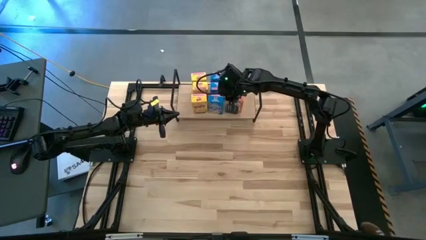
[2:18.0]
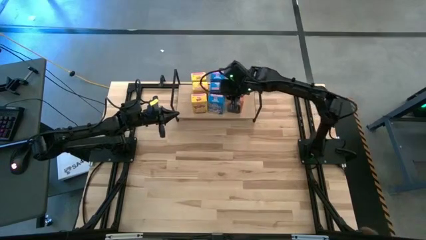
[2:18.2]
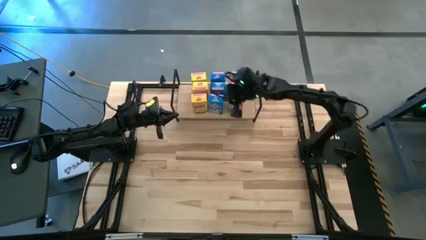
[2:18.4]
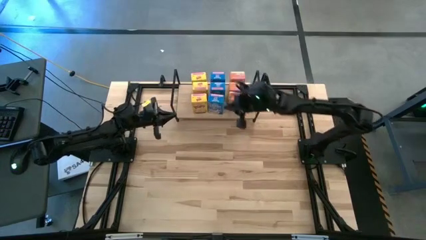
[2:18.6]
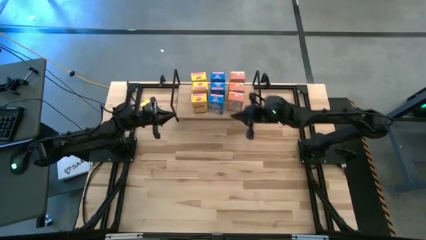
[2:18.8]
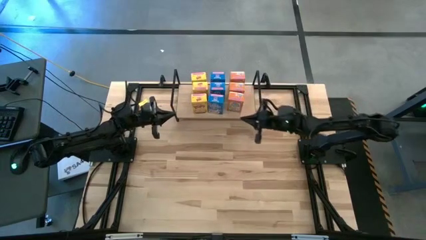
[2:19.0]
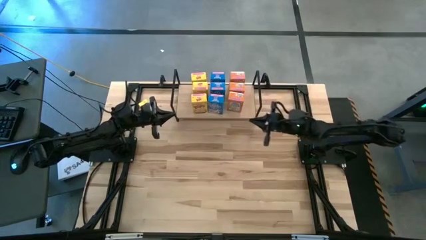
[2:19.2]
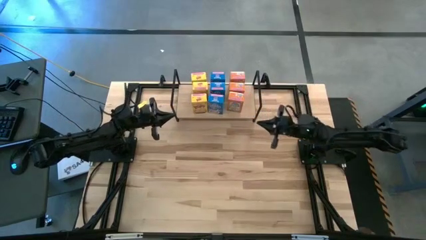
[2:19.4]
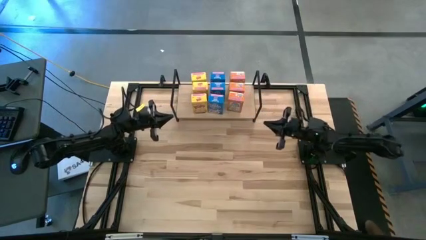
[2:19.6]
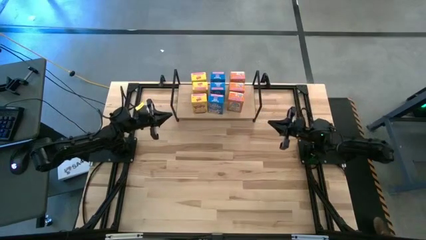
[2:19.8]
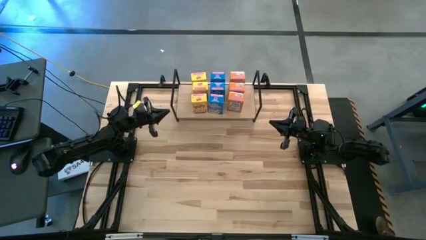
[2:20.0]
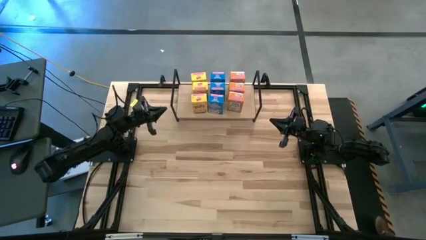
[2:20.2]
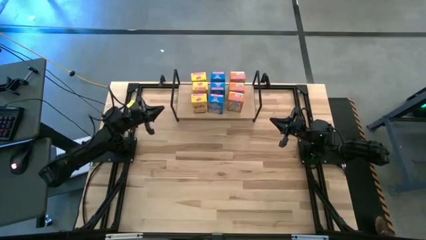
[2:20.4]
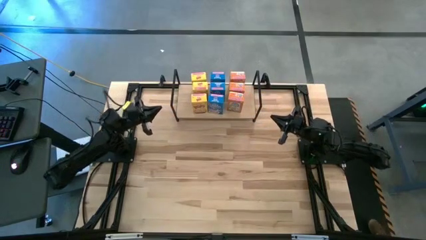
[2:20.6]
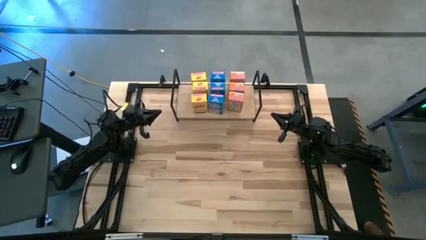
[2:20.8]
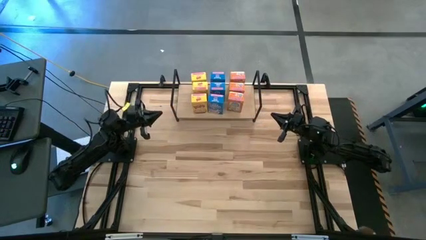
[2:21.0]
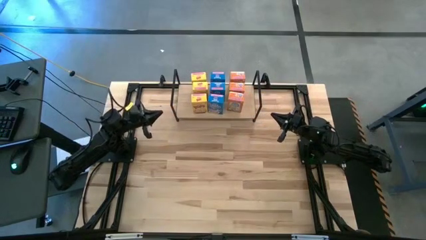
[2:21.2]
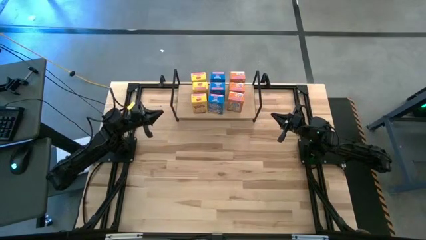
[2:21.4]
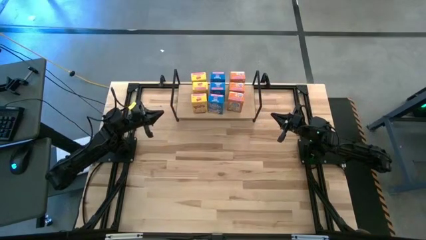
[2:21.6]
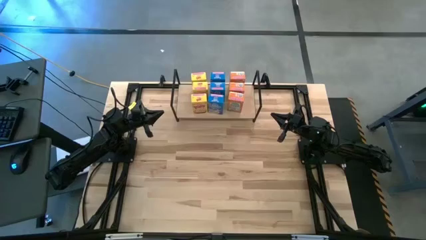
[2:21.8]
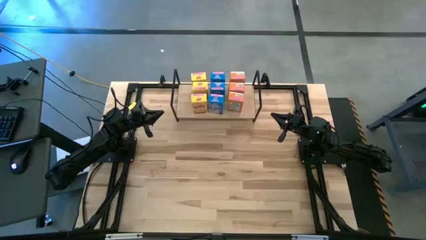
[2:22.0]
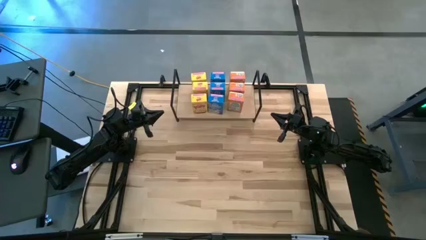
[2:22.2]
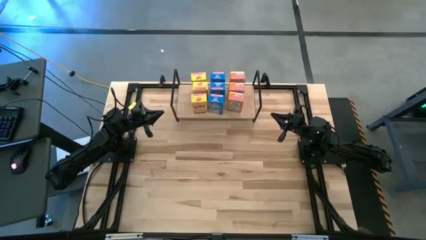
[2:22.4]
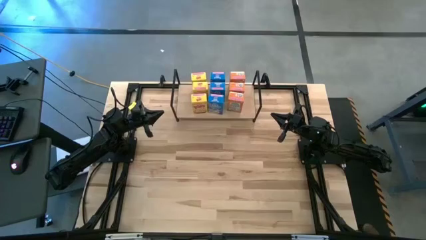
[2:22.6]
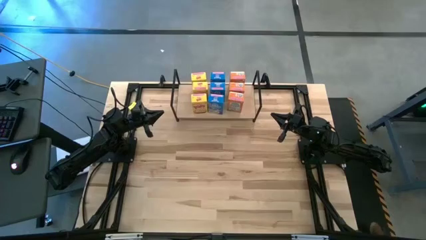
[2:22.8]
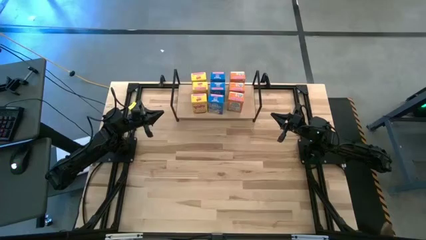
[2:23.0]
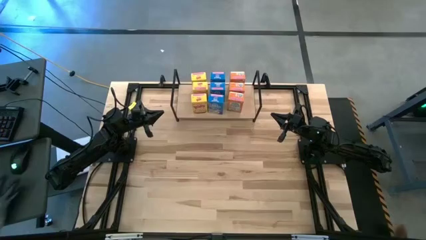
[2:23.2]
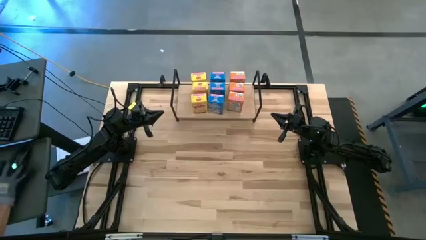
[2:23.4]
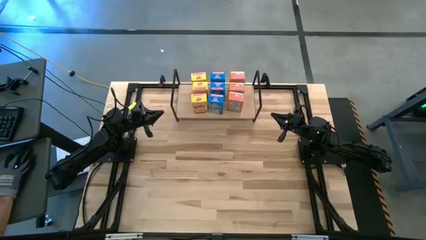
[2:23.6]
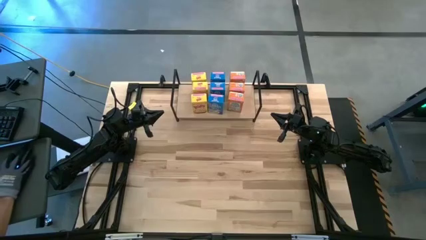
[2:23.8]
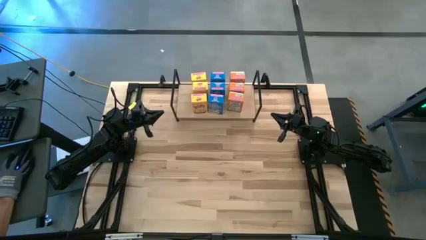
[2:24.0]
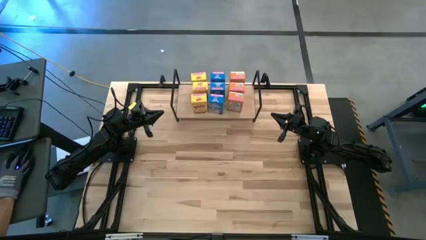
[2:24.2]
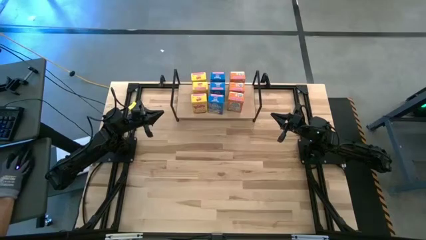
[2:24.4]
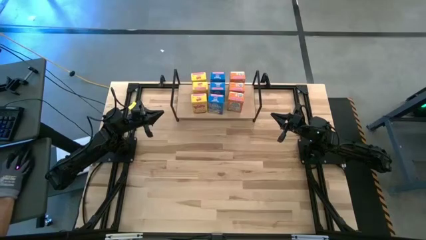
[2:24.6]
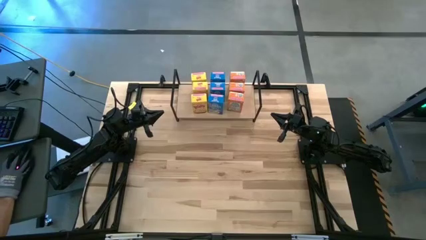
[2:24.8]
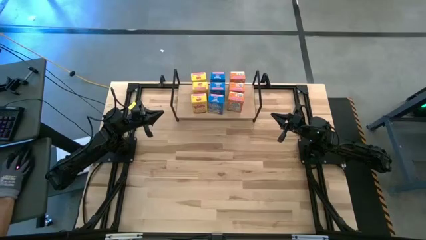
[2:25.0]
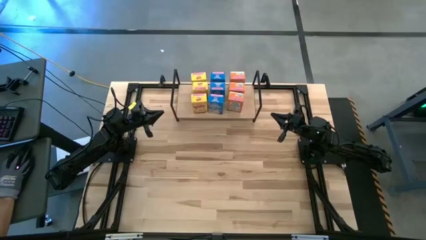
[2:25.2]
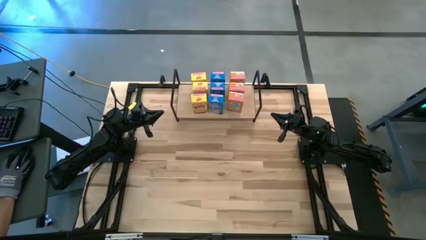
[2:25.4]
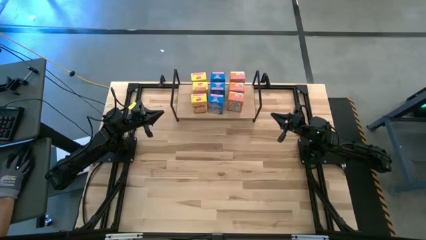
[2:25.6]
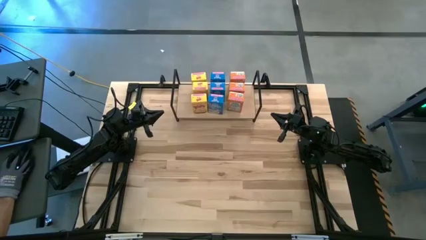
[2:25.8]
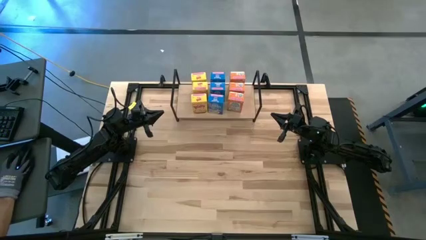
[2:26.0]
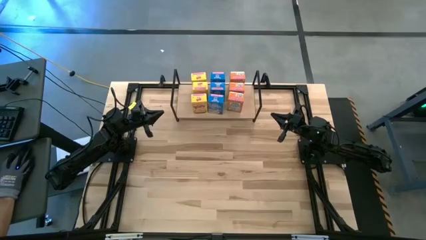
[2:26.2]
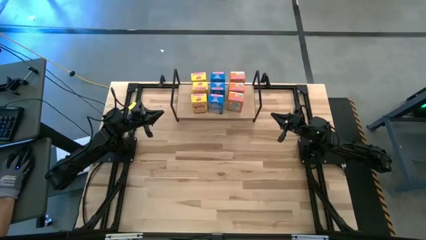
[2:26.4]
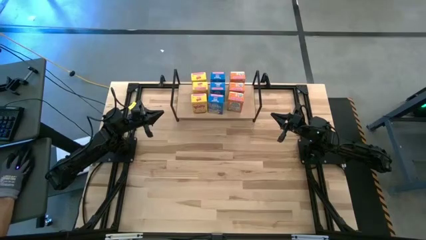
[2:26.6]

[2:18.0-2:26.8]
Task: Stack cereal on shelf
Return to Home Position
